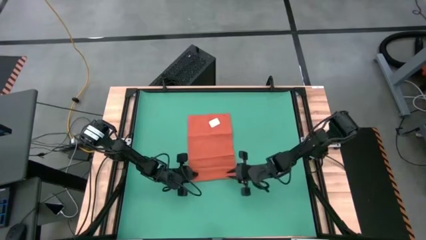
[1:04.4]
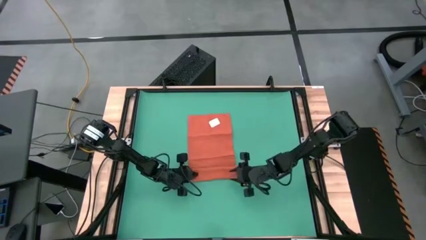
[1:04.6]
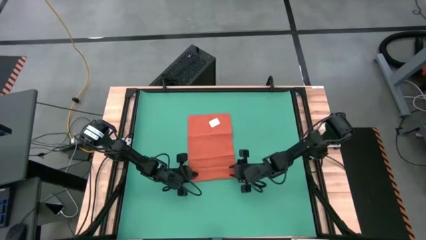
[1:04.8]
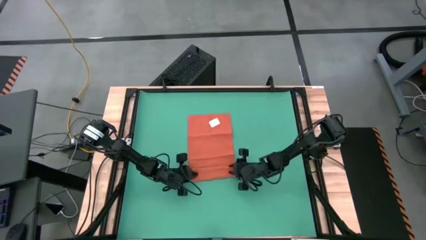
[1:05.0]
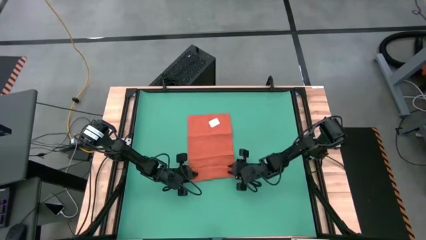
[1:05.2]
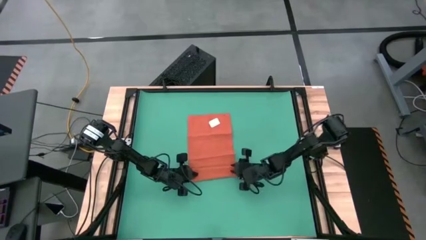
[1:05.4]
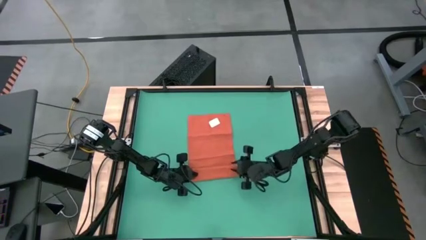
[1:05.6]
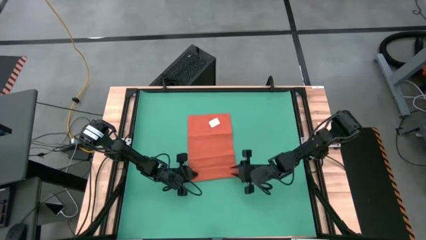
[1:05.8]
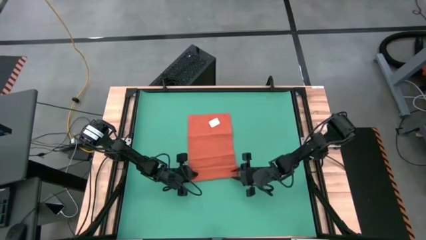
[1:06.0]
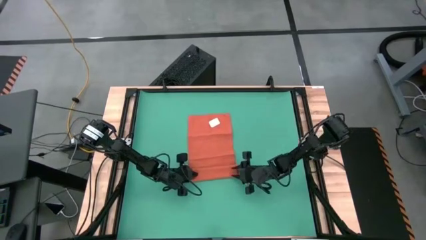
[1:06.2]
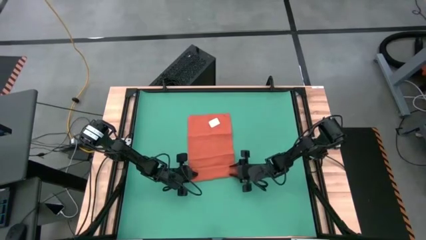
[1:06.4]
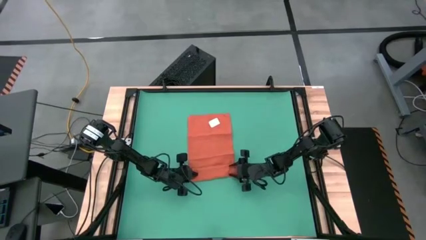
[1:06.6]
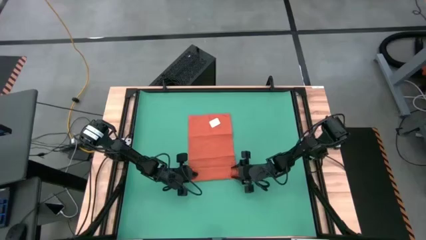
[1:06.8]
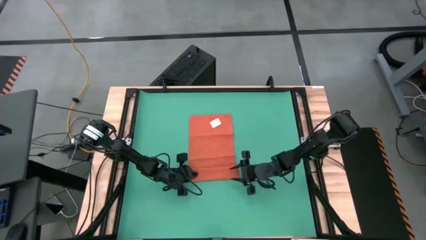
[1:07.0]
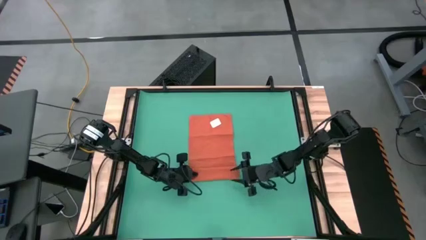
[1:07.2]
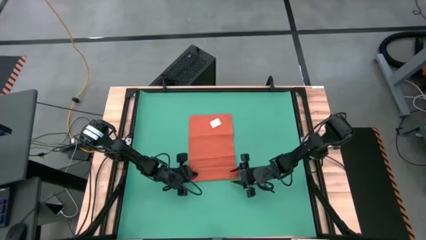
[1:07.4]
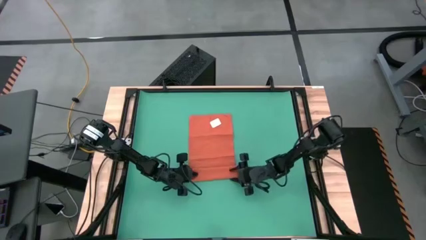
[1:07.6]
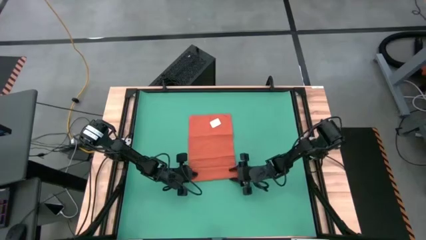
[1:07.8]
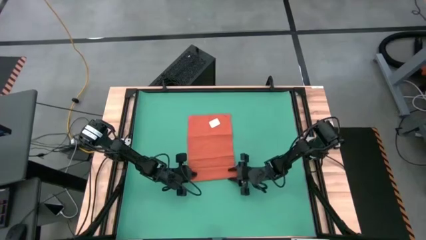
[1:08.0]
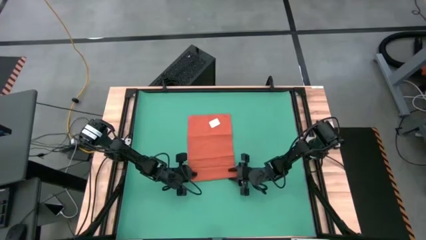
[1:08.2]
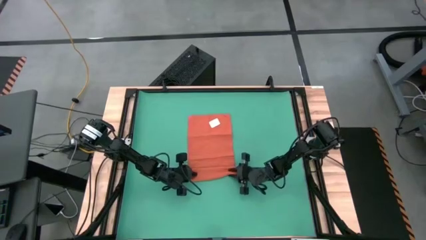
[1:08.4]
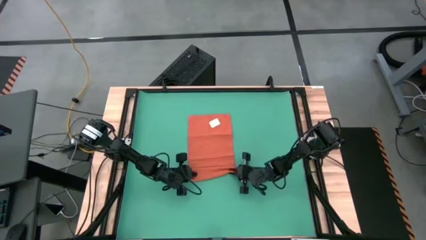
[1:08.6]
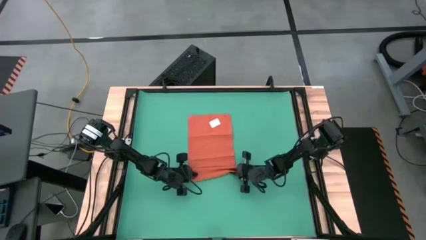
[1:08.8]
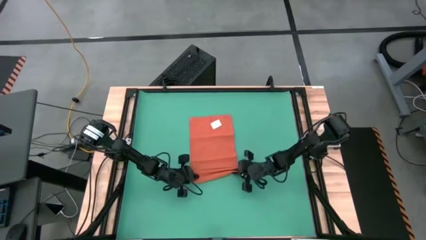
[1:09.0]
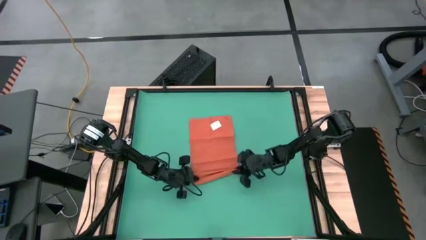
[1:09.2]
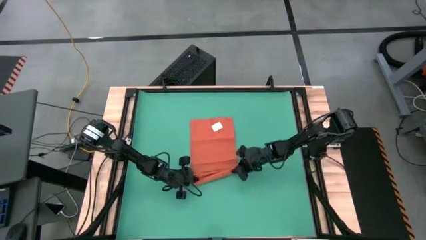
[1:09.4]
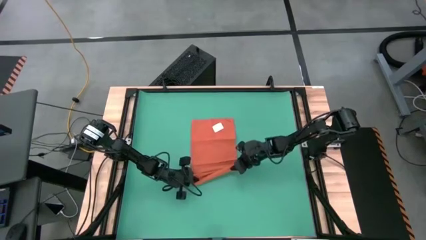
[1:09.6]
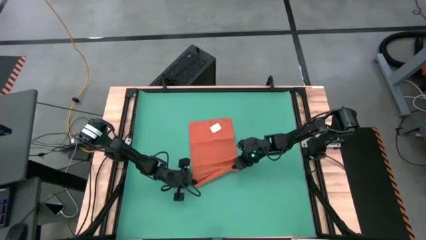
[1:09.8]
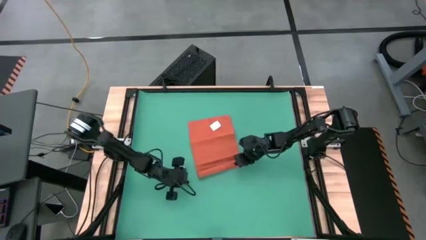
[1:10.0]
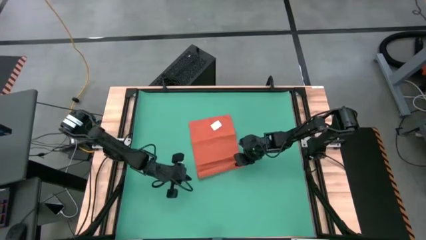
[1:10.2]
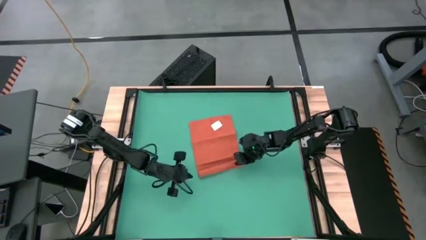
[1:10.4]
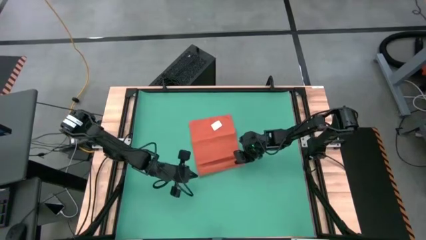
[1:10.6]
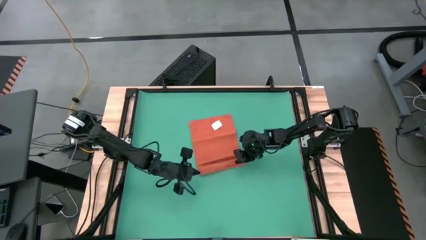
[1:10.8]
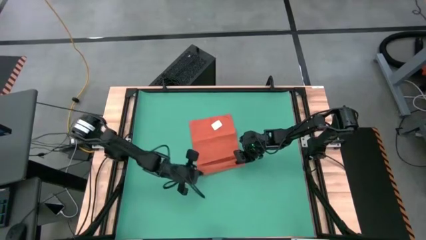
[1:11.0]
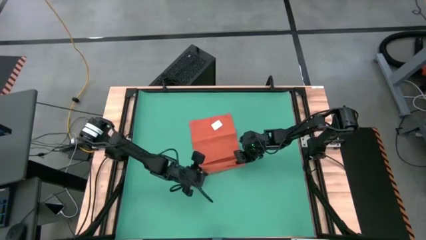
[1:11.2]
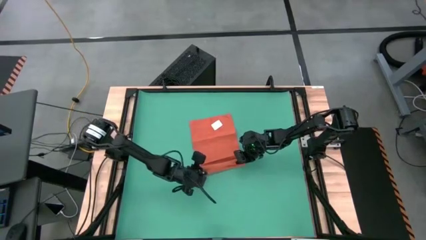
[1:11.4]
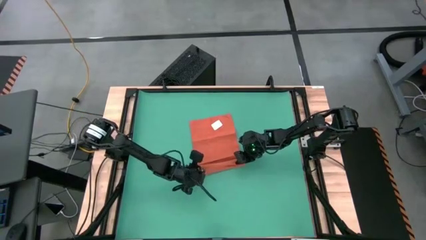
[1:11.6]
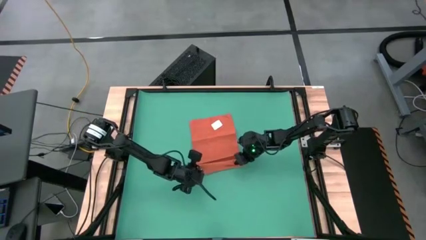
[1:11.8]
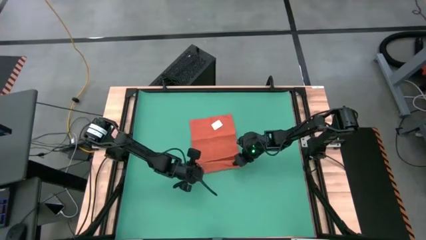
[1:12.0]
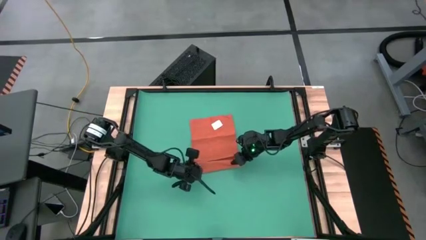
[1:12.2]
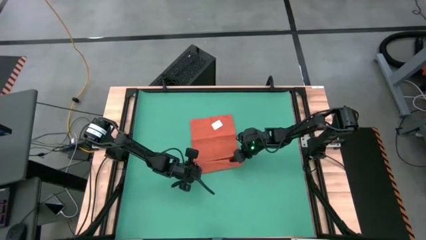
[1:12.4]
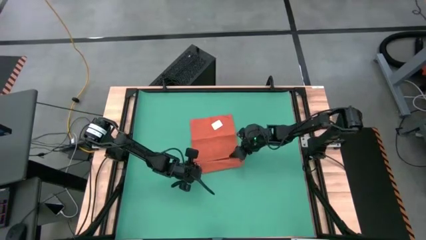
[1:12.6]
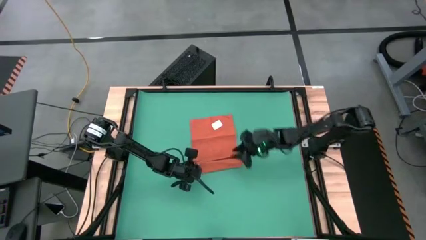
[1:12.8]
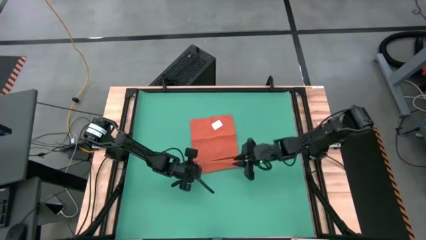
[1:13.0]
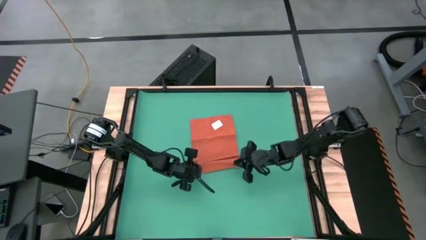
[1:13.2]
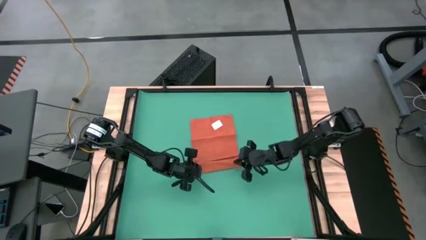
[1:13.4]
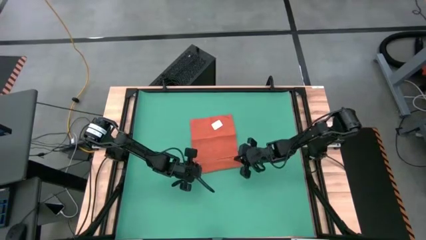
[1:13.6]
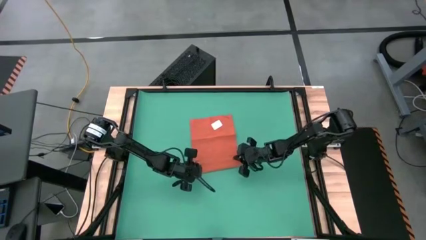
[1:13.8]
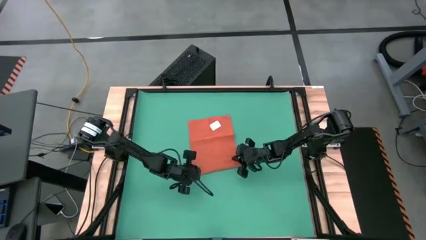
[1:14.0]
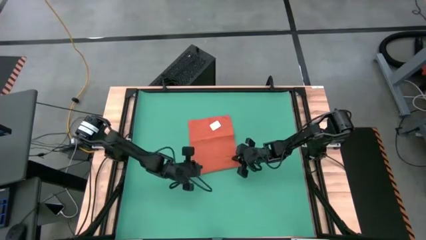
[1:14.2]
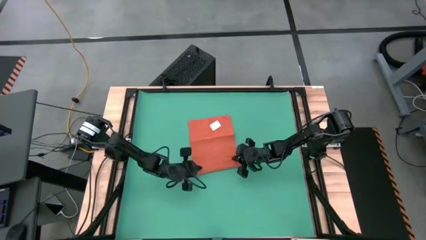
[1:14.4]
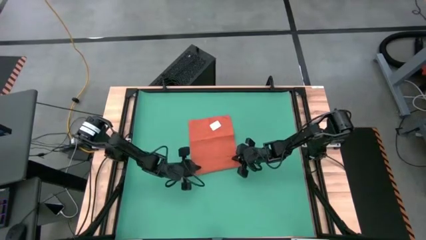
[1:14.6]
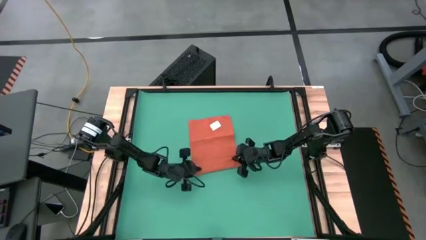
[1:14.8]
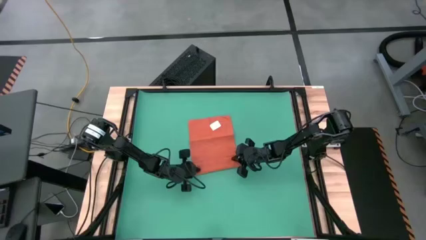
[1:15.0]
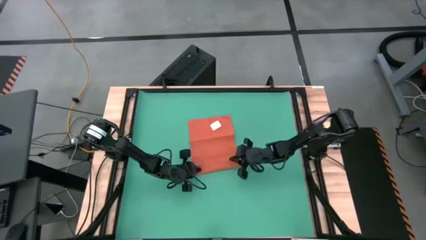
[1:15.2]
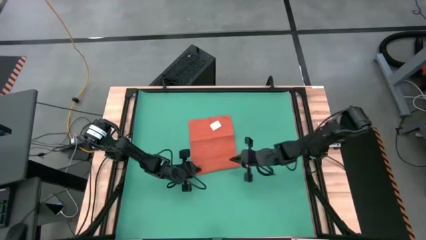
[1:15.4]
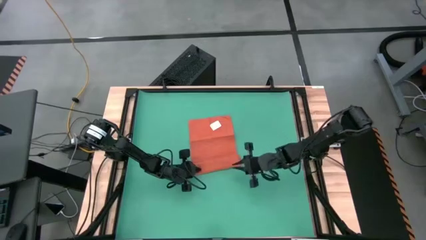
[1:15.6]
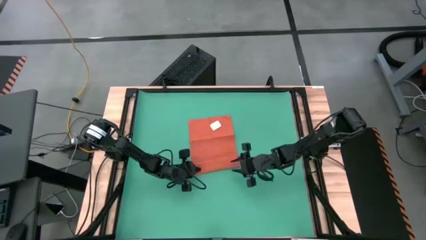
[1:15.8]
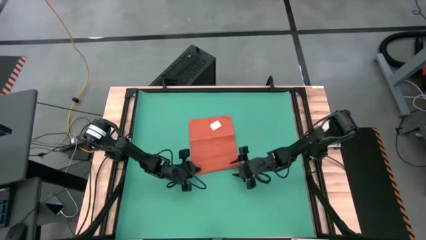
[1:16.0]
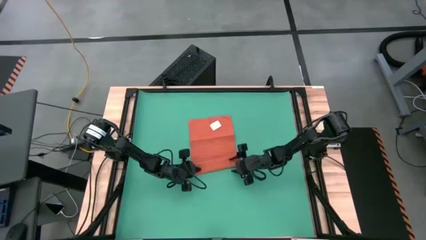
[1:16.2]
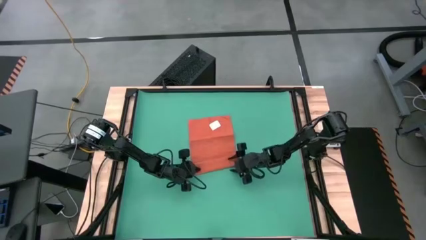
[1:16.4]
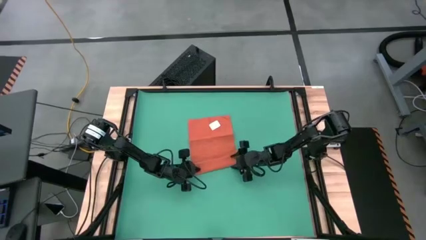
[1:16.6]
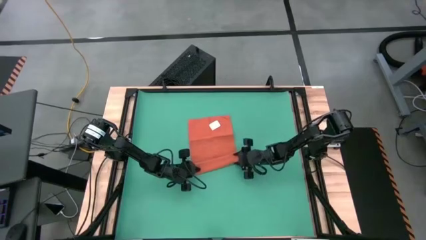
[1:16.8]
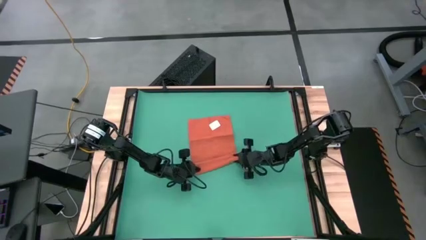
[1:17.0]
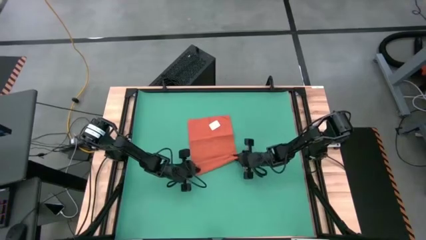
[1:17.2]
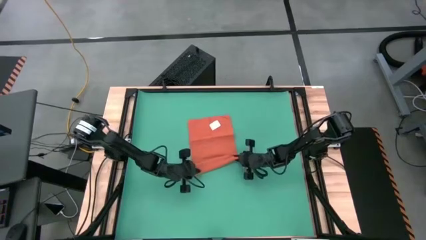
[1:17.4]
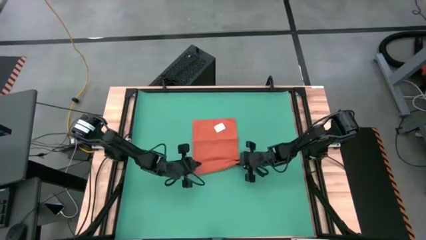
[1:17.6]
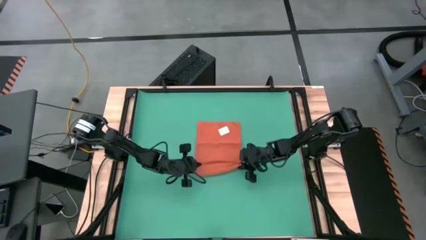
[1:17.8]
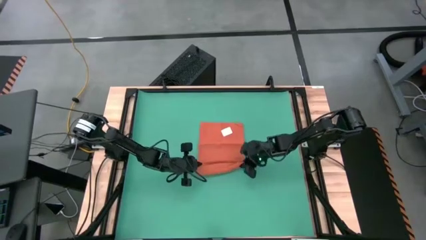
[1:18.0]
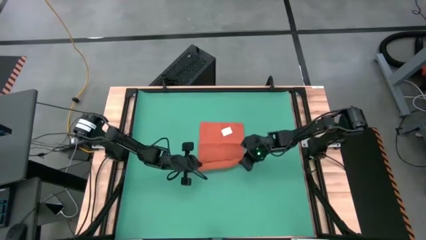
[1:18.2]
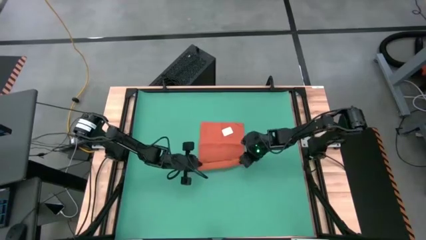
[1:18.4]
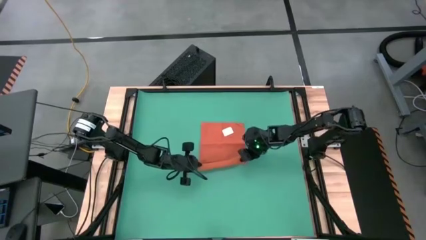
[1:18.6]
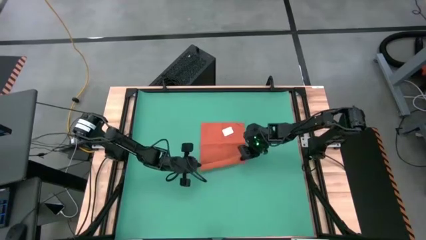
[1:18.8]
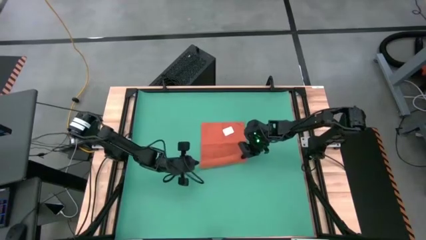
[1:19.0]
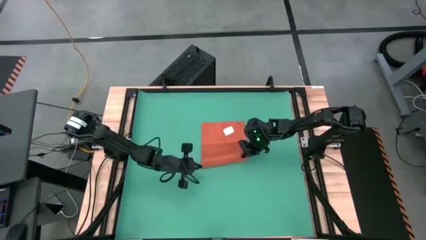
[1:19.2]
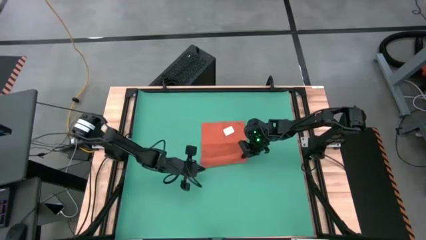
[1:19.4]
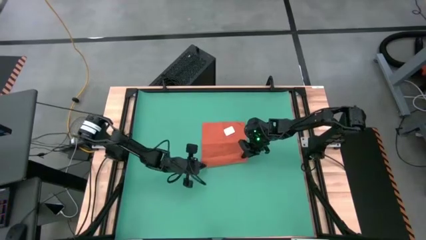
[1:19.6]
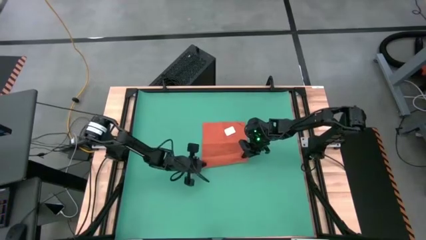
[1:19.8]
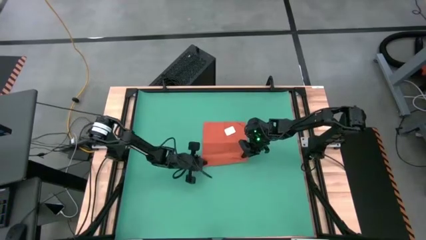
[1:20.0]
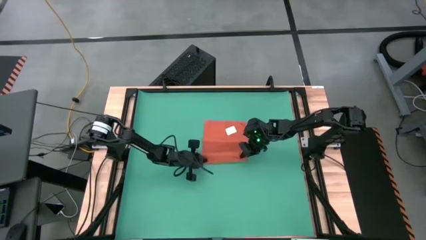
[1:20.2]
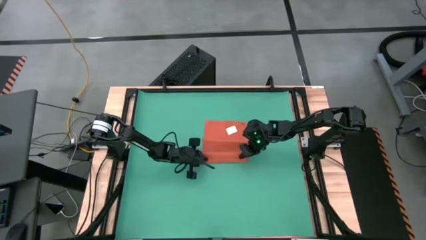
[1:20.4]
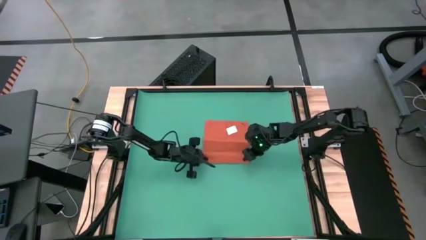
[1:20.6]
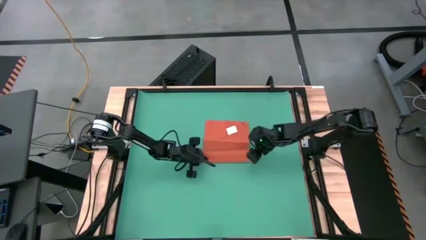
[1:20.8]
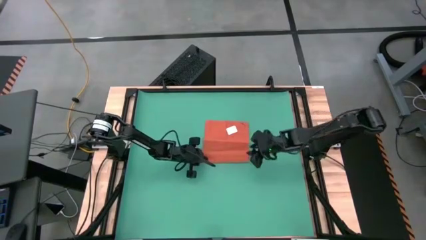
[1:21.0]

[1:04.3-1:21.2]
Task: Roll towel
Roll the orange microfiber towel
